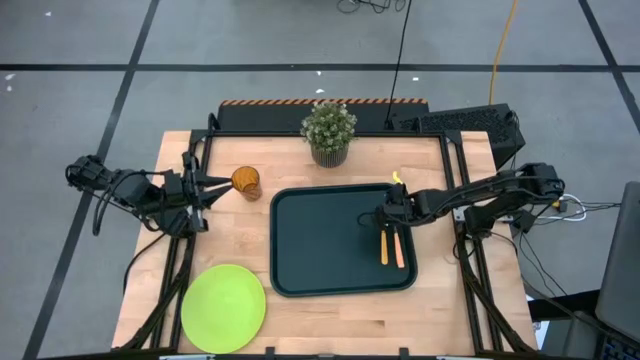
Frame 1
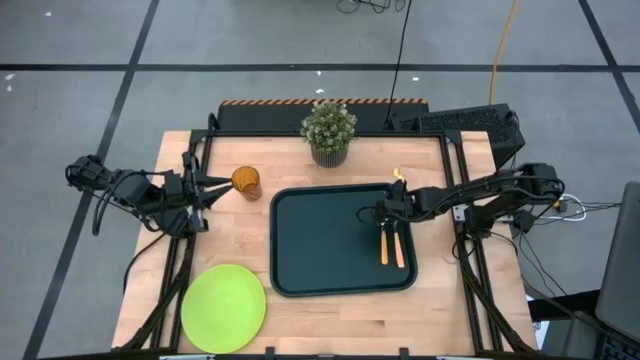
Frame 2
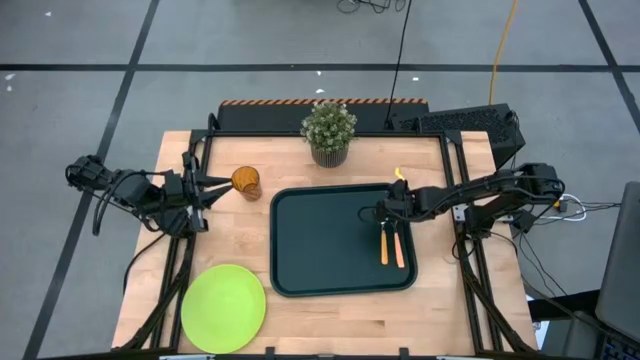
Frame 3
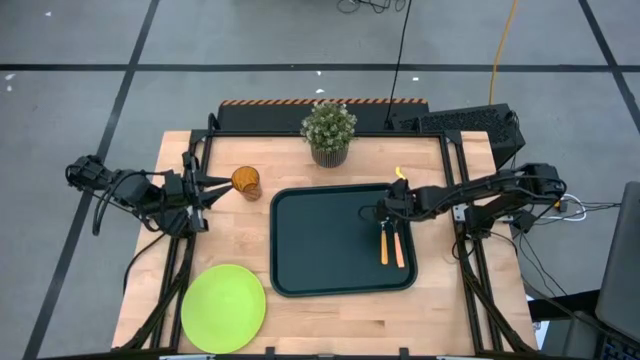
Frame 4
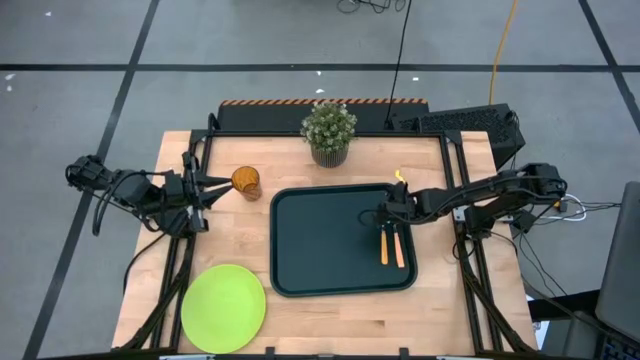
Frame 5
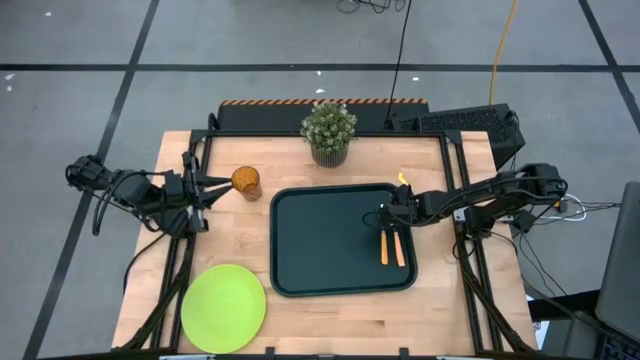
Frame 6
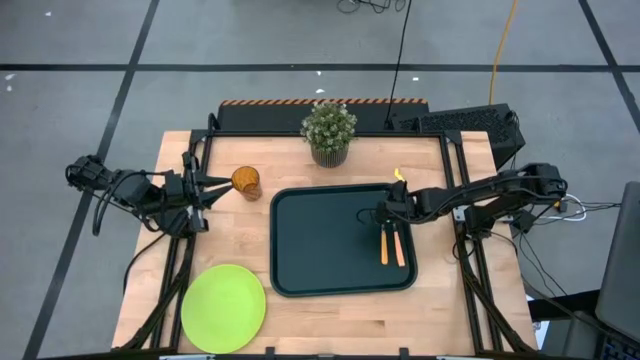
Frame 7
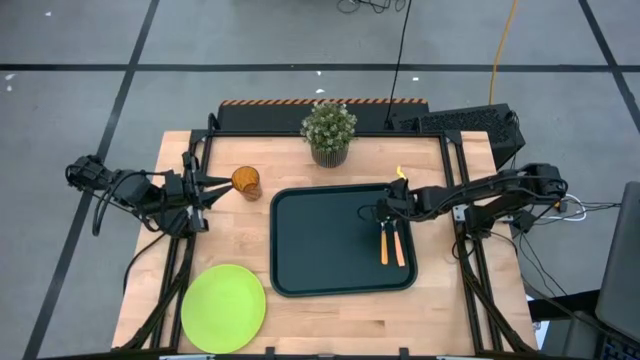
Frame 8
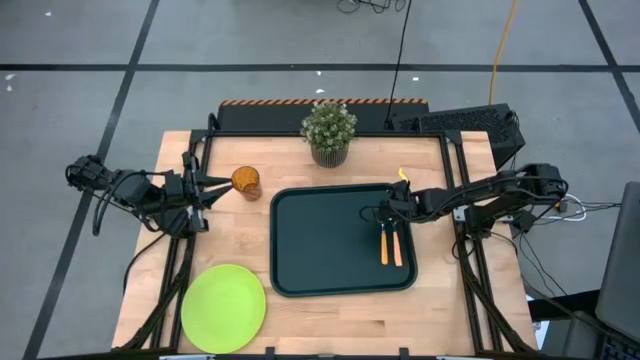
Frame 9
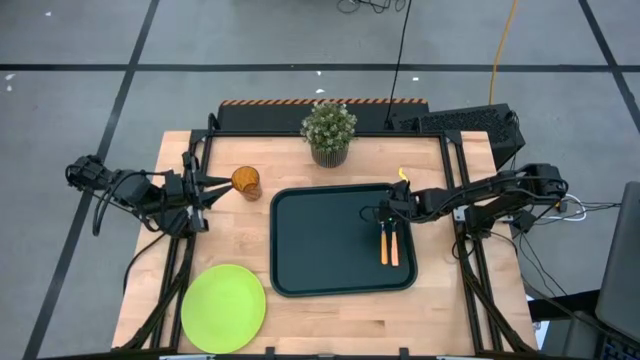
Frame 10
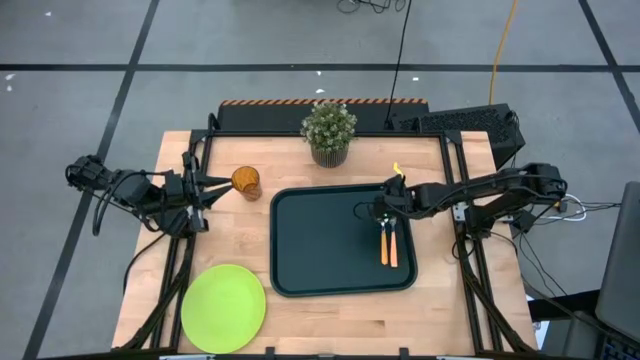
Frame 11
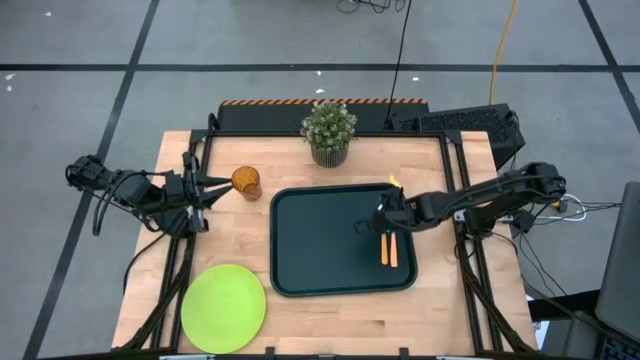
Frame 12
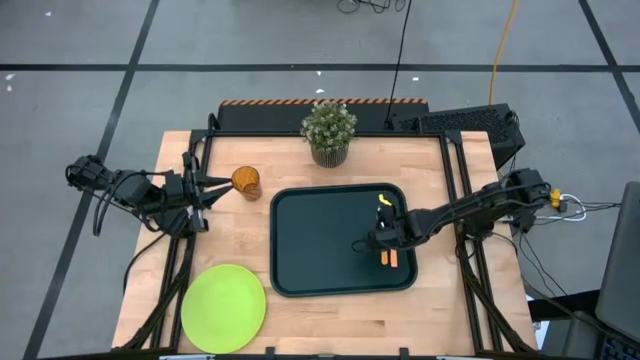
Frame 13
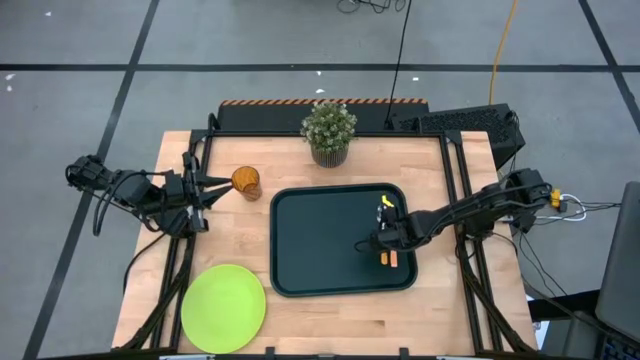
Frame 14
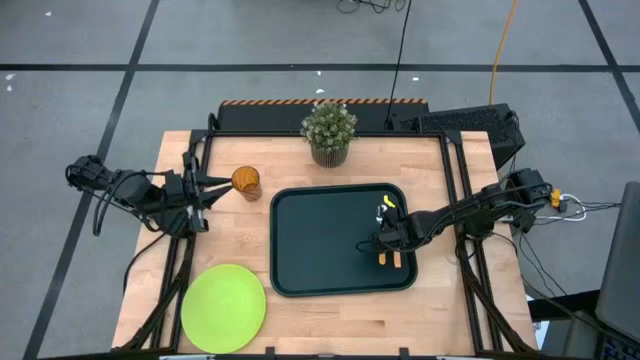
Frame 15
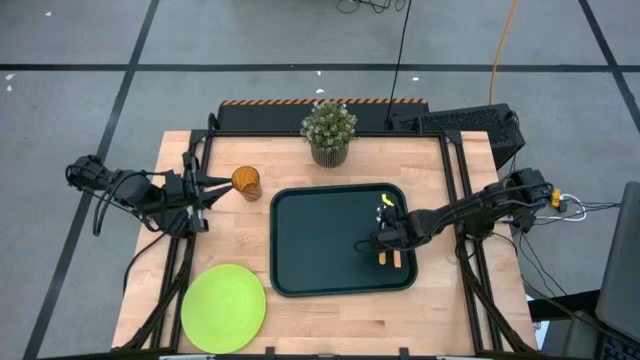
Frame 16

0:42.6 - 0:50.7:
Task: Pick and place plate/cup/fork/spoon on tray
Adjust the fork on the serving tray

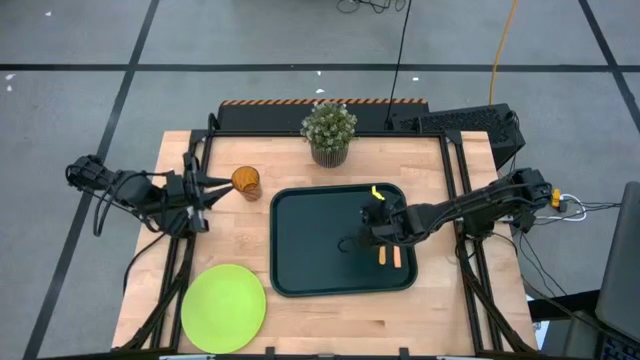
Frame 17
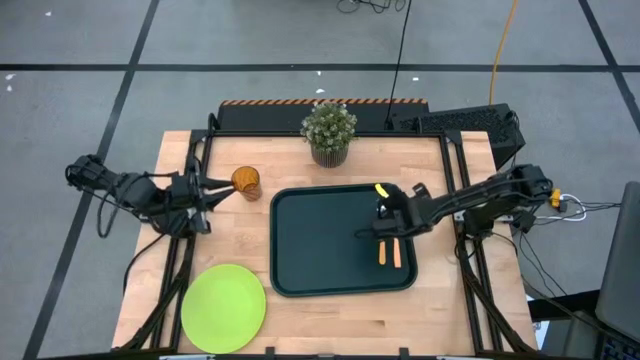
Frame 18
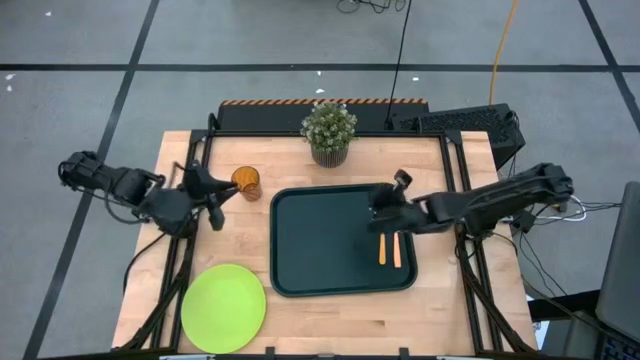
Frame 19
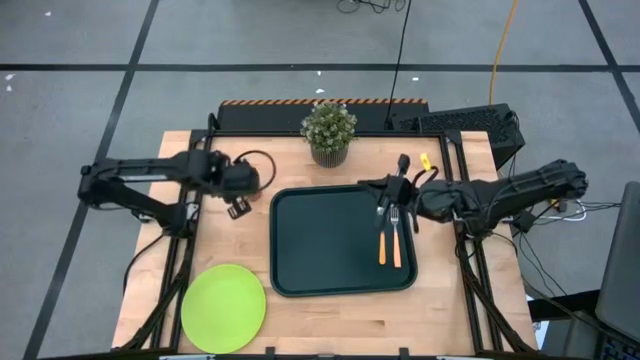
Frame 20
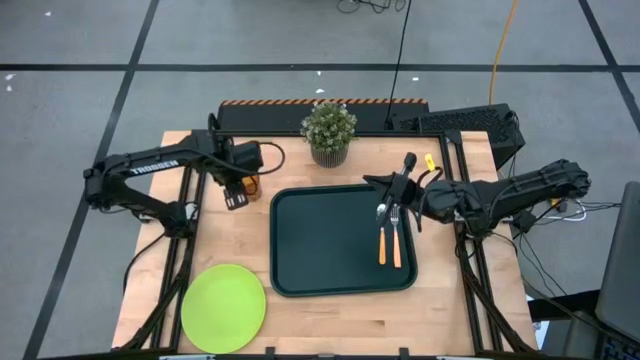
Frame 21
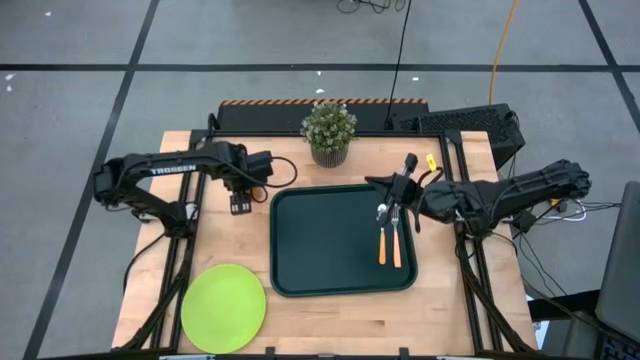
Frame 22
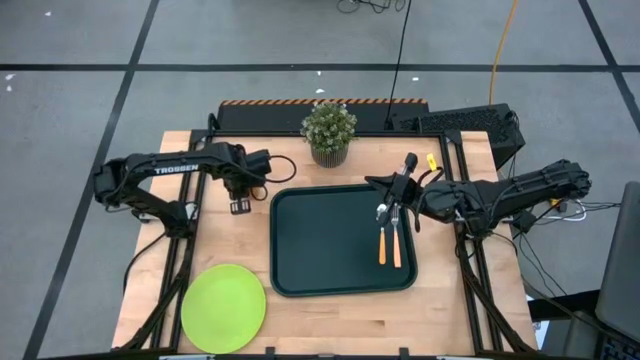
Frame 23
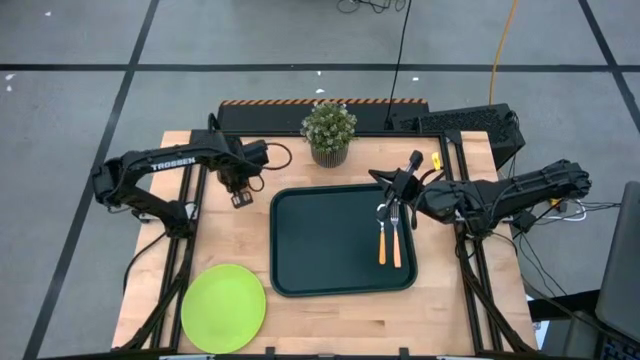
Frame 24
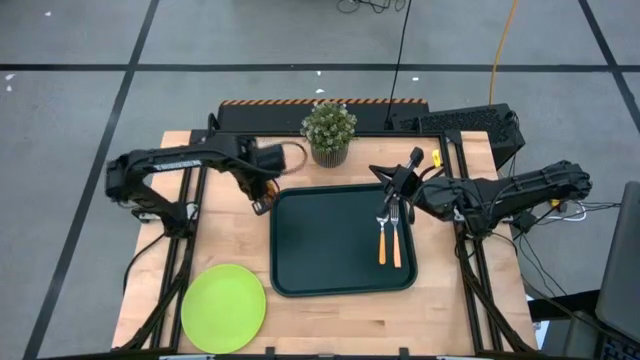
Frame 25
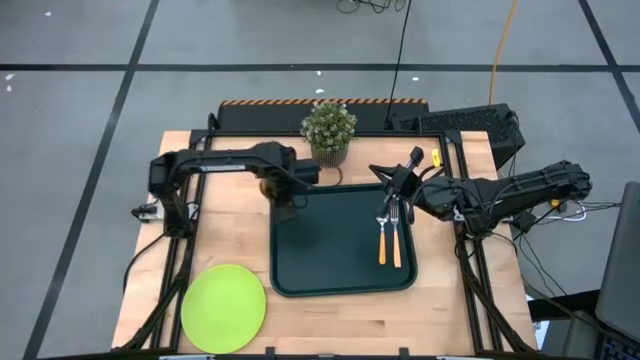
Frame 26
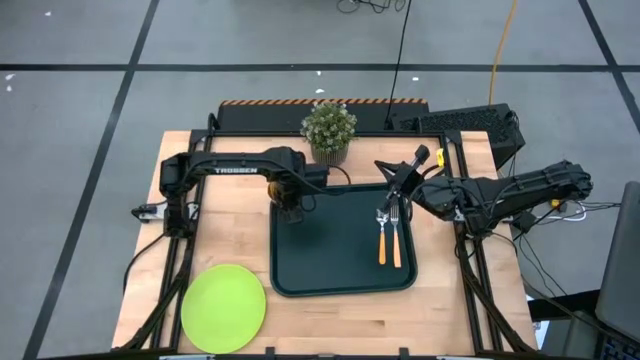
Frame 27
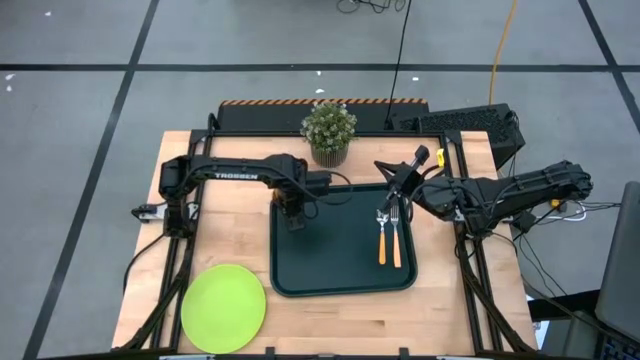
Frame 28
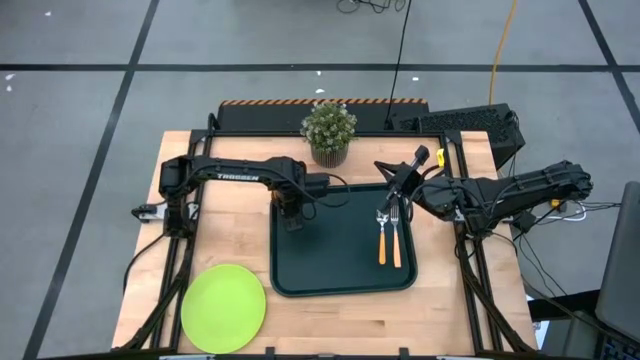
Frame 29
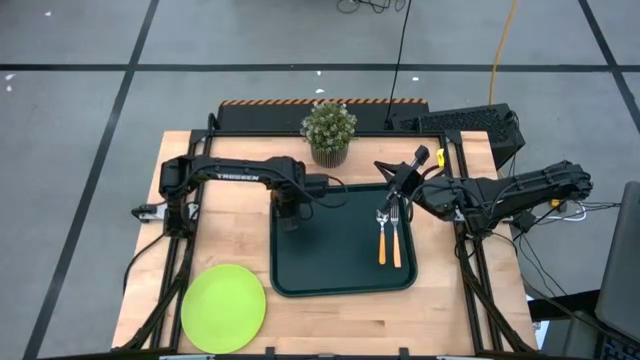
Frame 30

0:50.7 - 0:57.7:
Put the cup on the top left on the serving tray

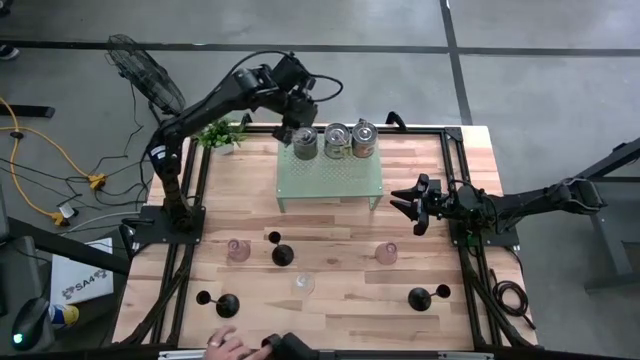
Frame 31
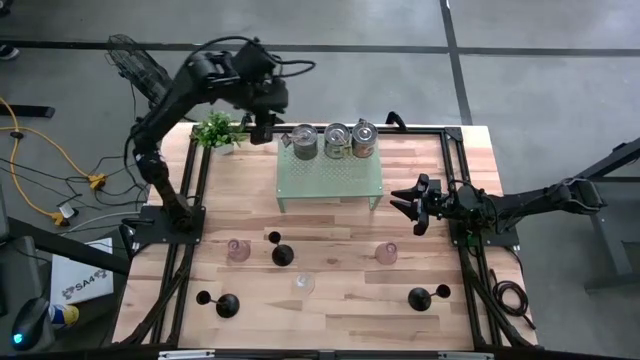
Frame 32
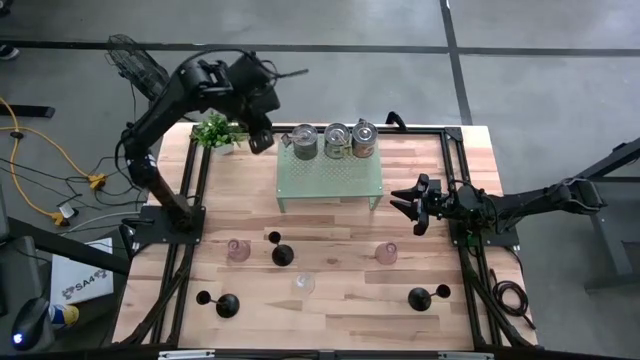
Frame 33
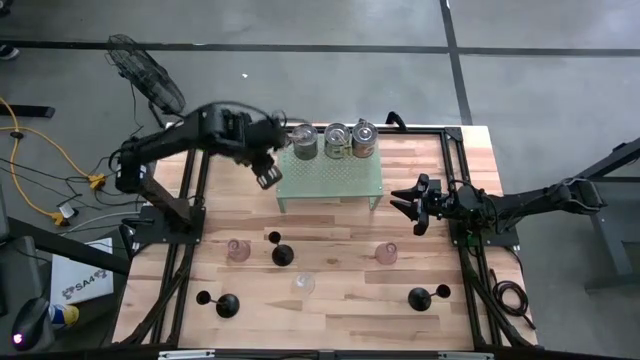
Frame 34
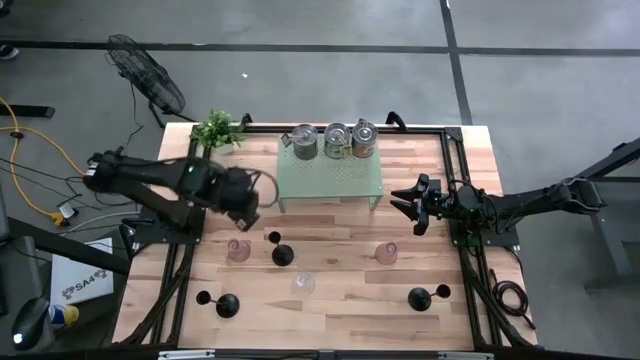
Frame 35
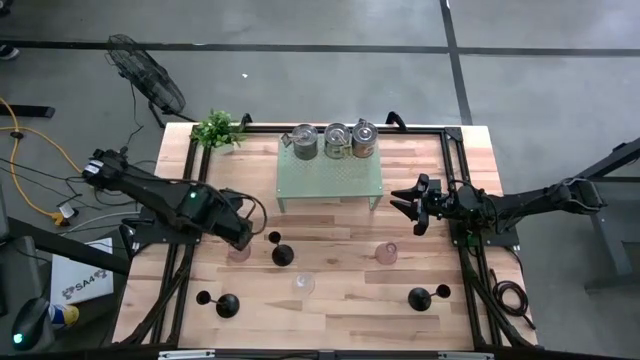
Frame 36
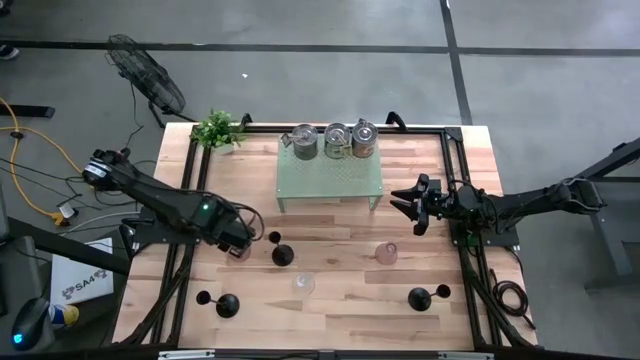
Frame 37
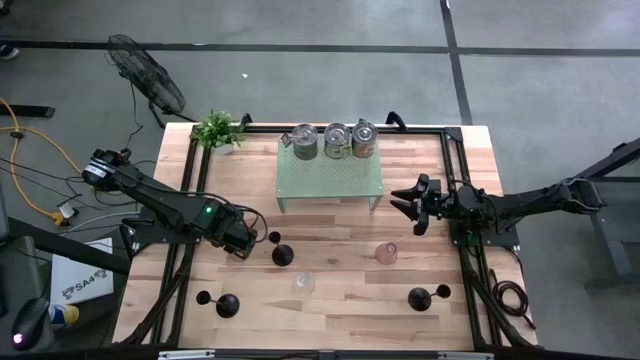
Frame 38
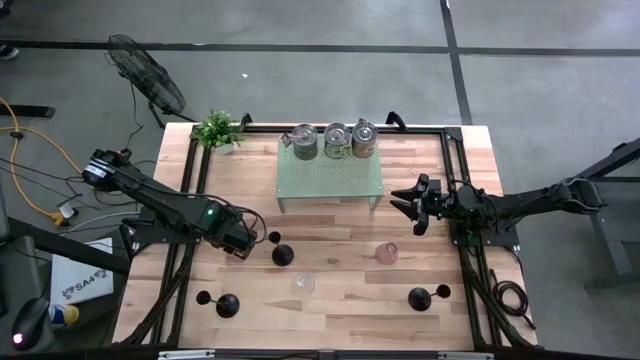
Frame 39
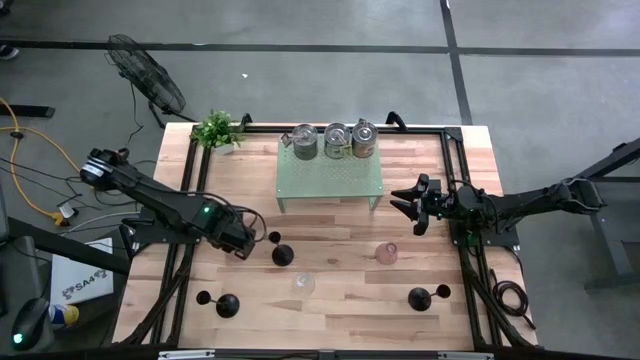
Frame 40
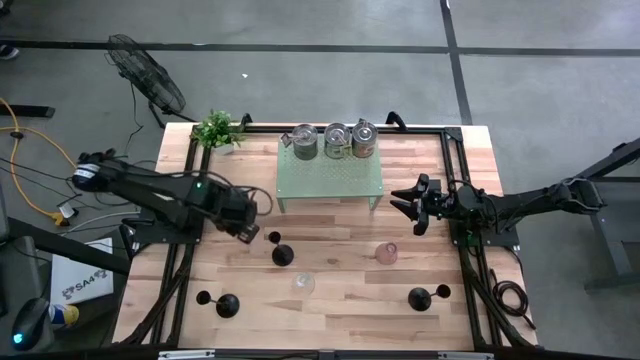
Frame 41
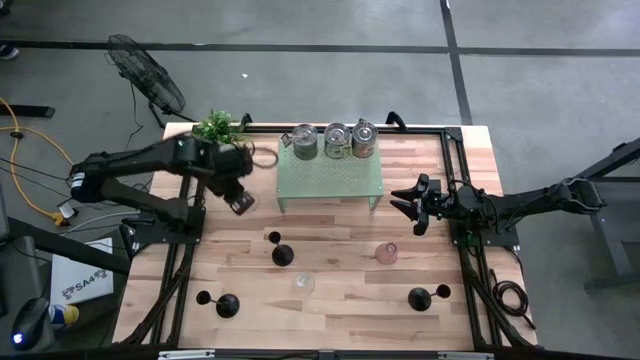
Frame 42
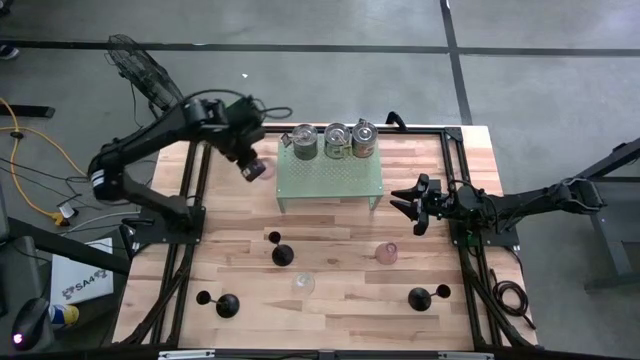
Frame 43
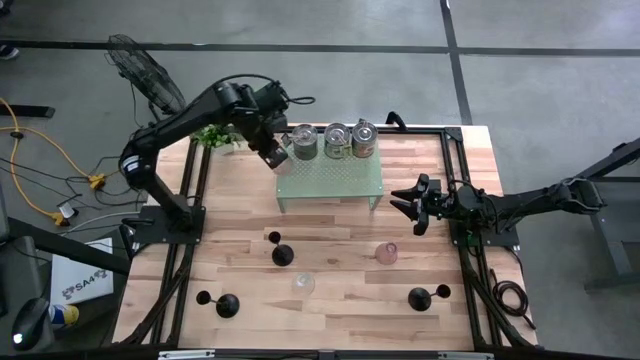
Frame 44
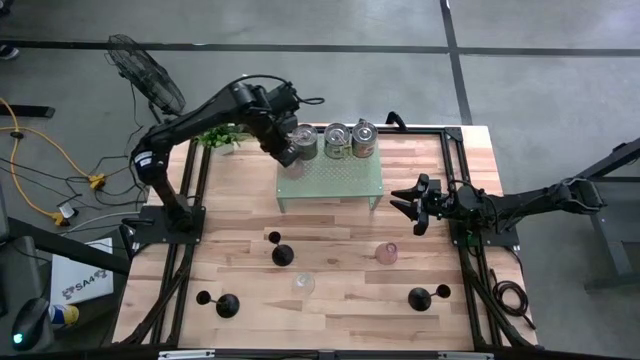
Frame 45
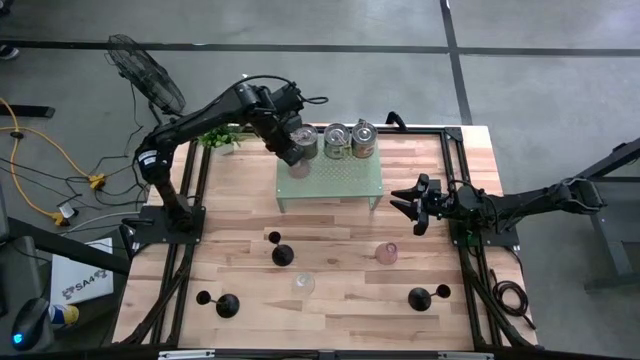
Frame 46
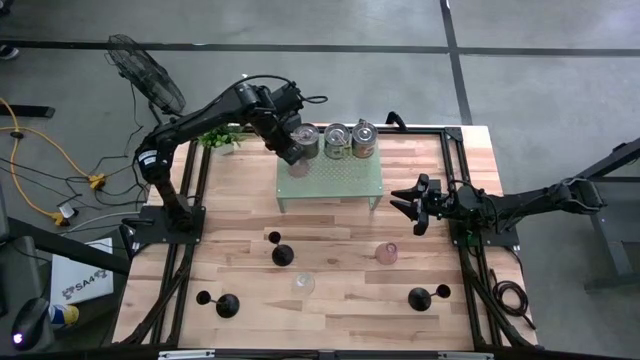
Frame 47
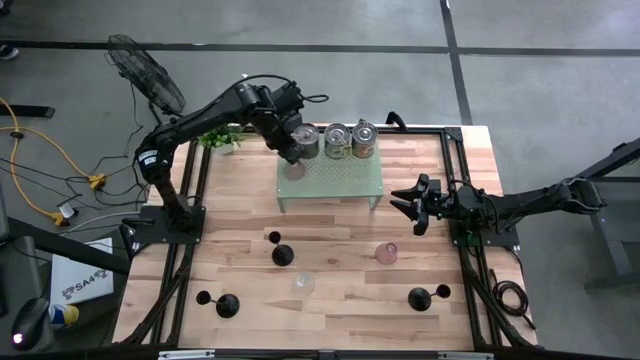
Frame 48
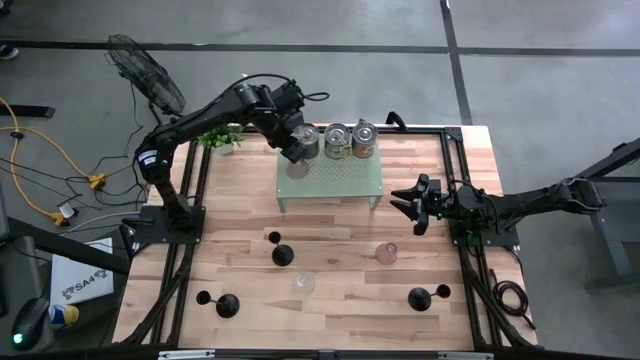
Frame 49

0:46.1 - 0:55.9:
Task: Pick & Place candle stick holders
Put the left pink candle holder on the shelf
